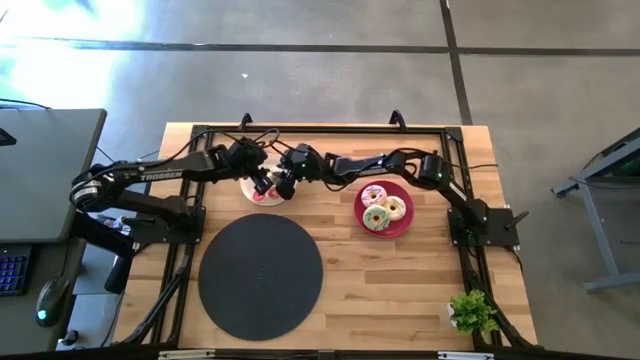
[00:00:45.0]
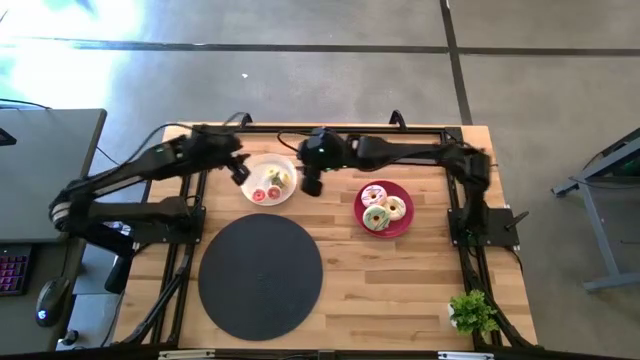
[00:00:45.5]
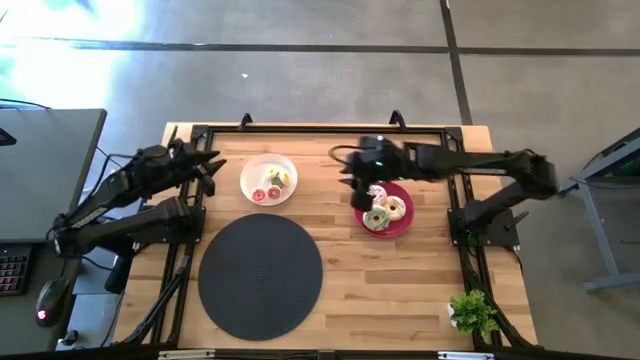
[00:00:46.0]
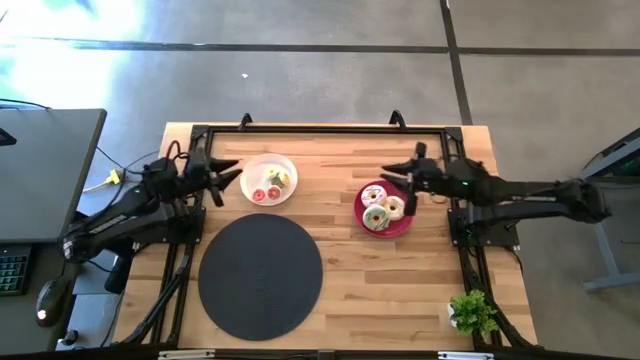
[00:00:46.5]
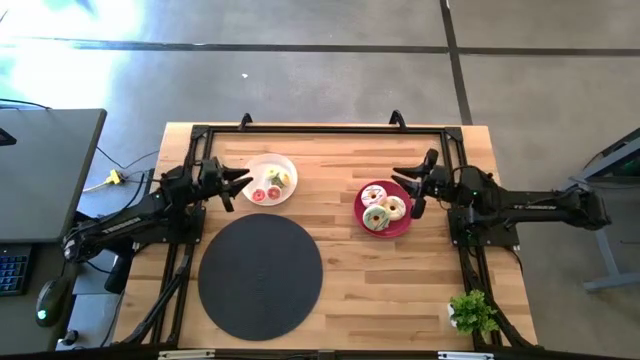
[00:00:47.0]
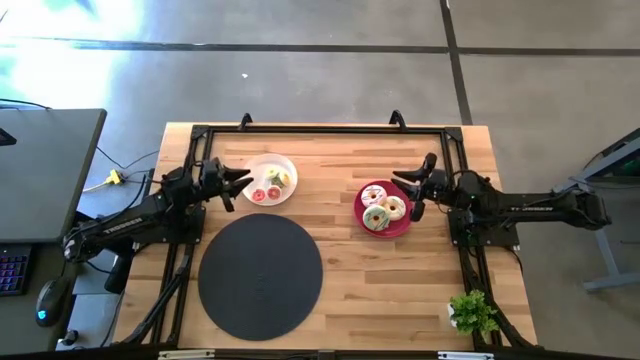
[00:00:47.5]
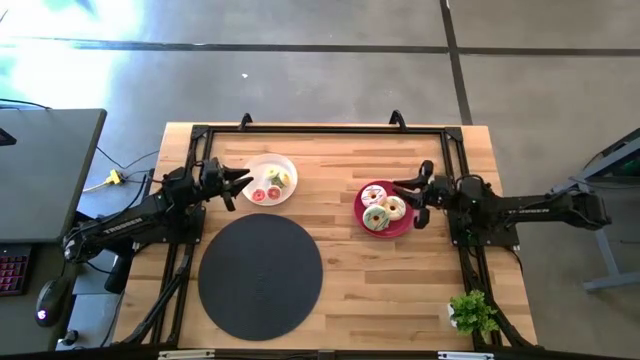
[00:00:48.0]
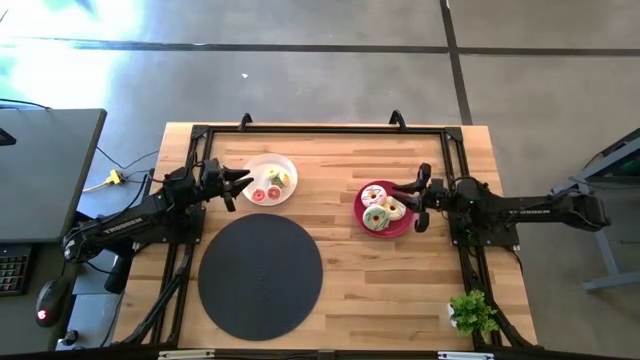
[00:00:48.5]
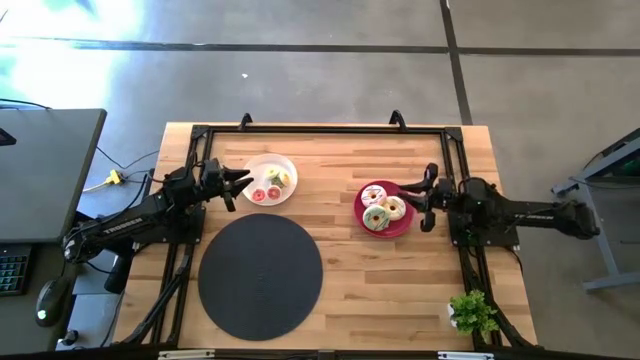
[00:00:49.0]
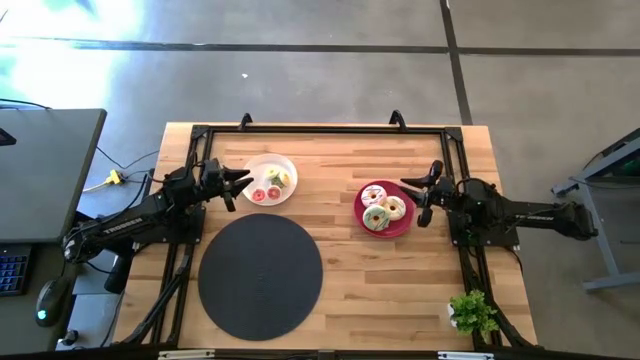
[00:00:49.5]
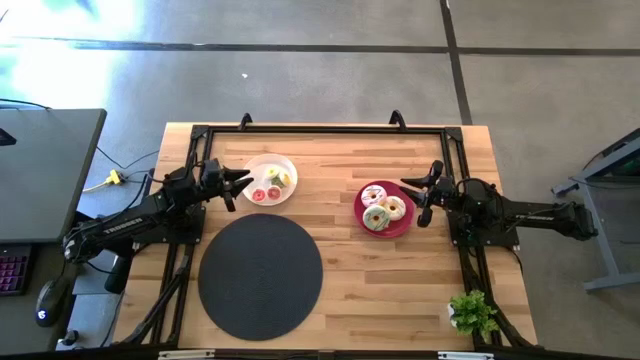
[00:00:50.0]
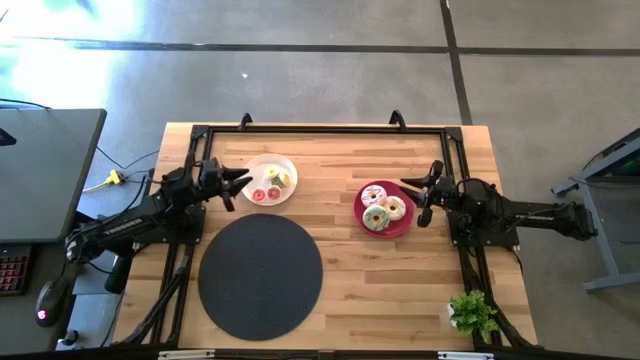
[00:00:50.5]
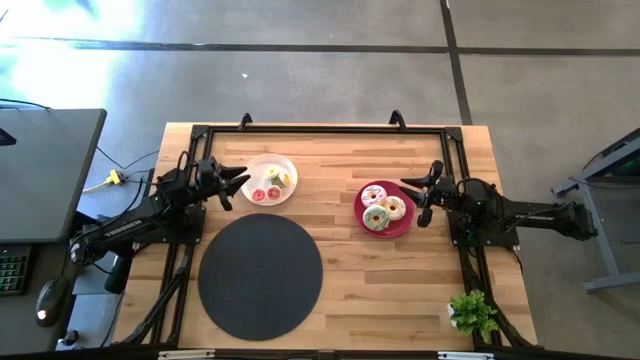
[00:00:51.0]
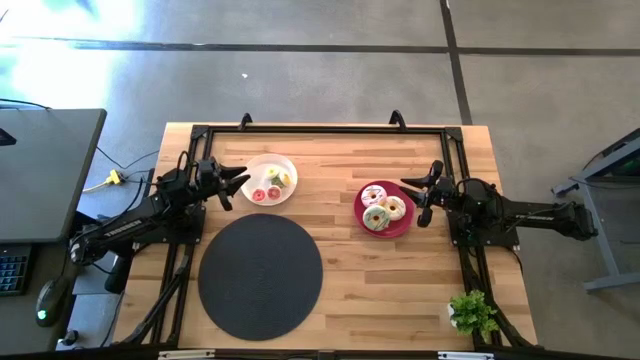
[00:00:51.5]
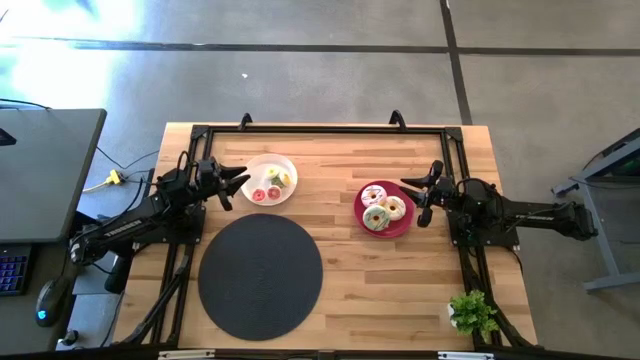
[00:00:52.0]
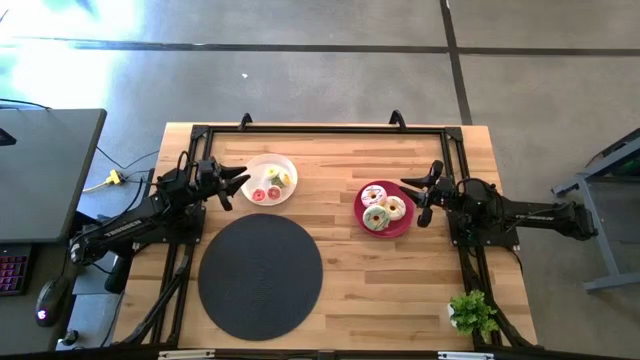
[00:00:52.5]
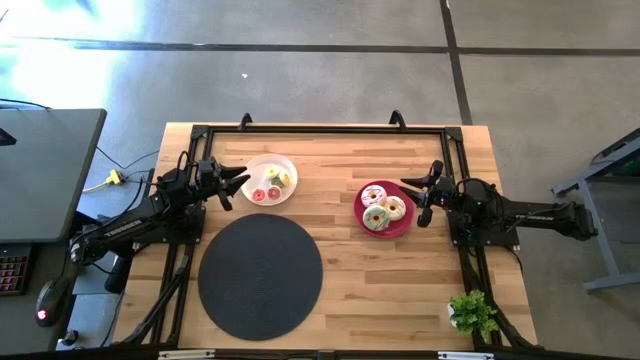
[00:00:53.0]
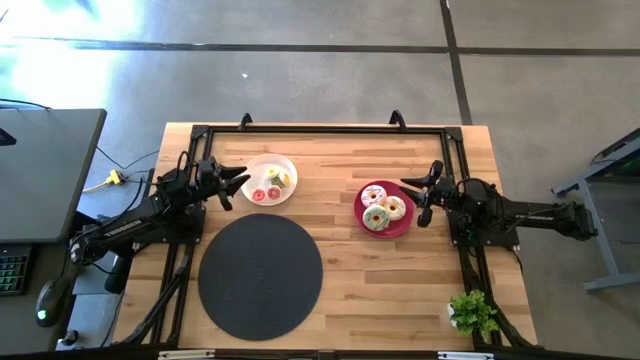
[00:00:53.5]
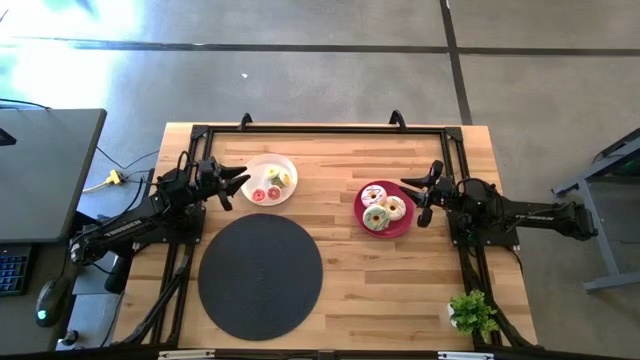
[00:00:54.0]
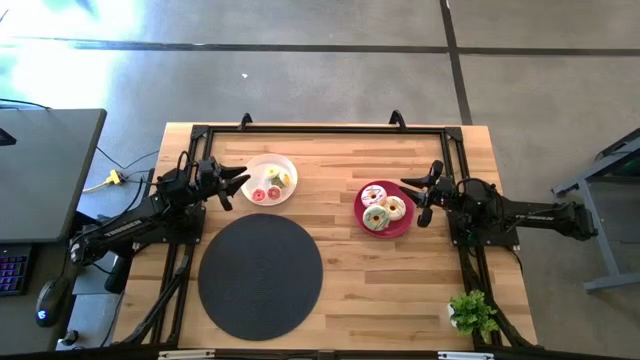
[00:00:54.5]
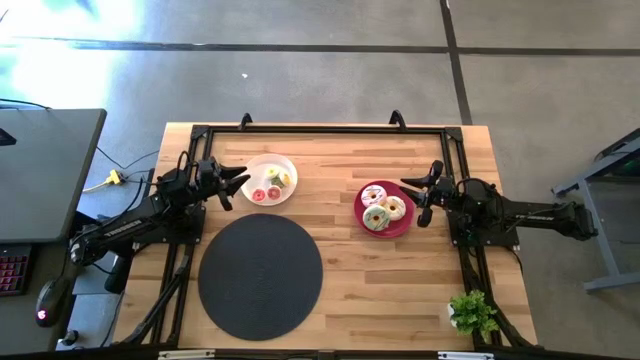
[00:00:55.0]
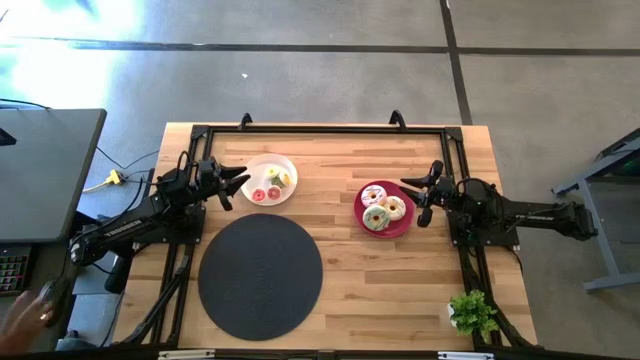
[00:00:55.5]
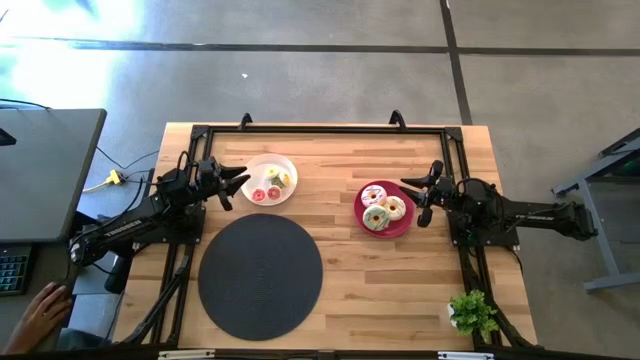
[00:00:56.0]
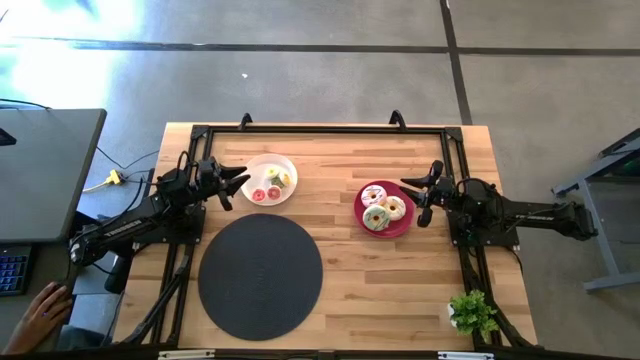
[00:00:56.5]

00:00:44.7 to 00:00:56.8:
Task: Pick & Place donuts
Return to Home Position

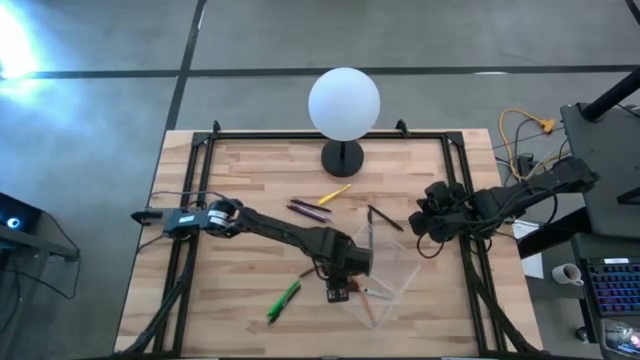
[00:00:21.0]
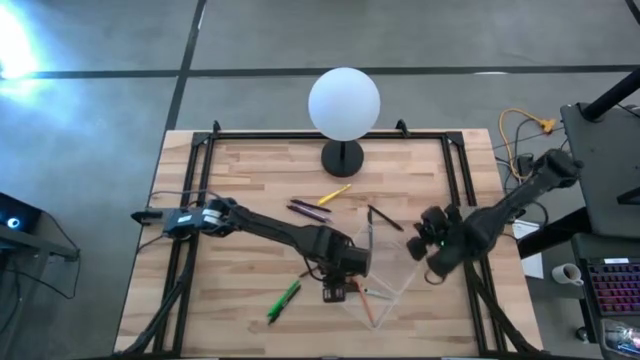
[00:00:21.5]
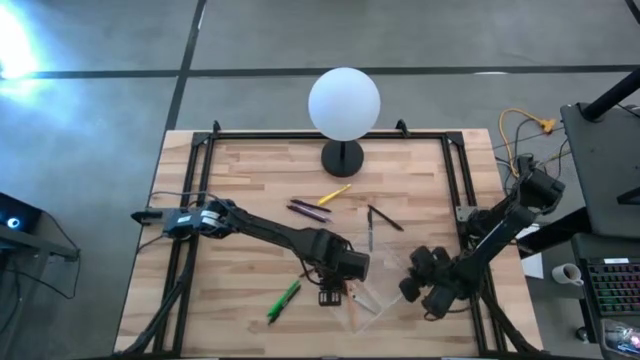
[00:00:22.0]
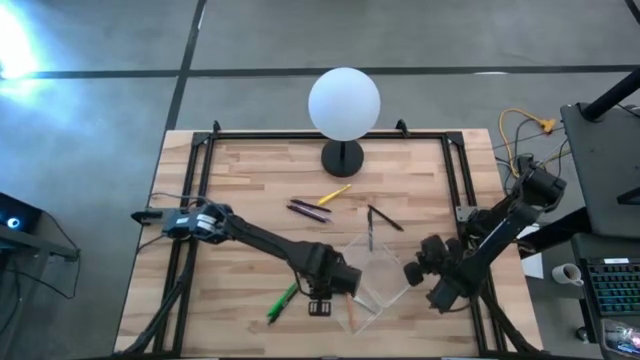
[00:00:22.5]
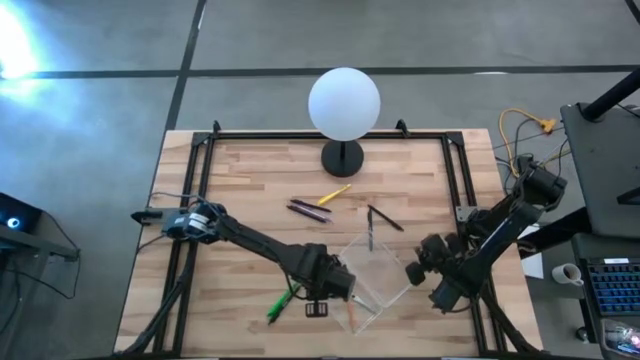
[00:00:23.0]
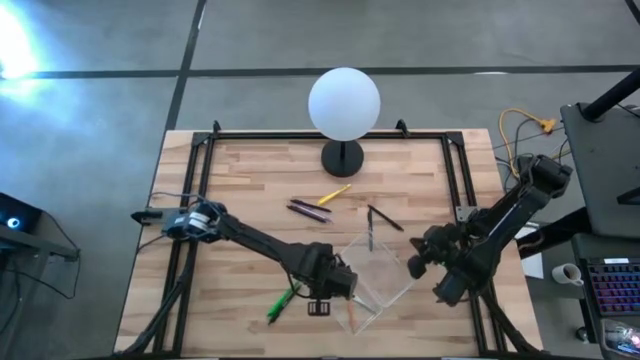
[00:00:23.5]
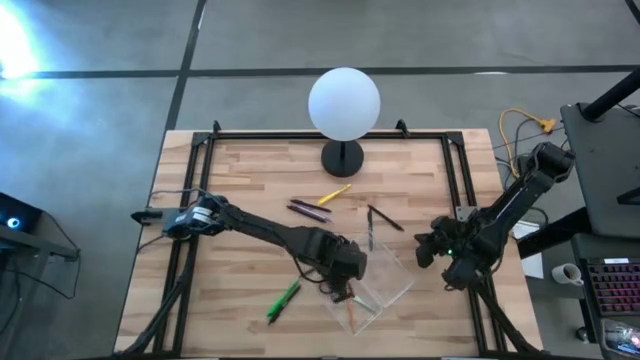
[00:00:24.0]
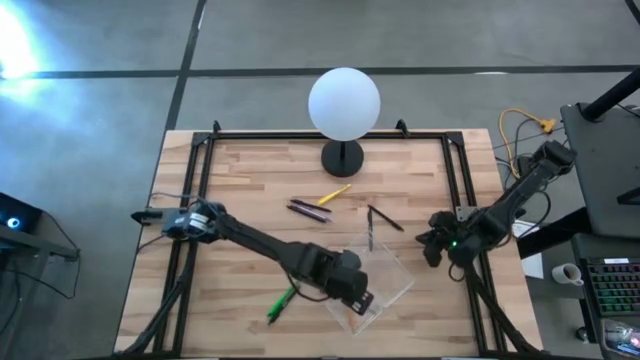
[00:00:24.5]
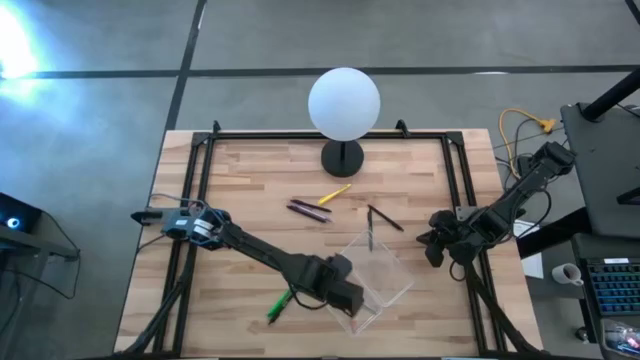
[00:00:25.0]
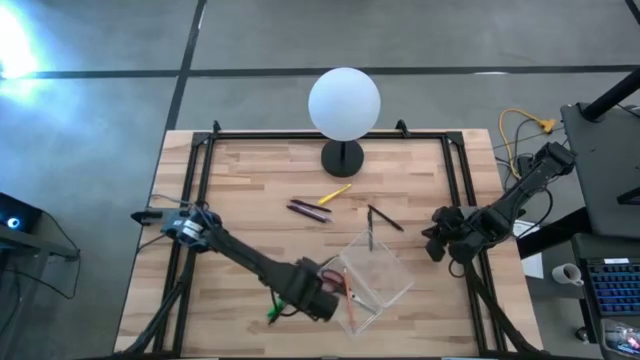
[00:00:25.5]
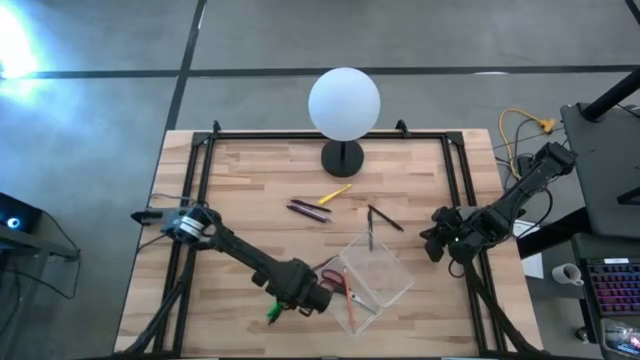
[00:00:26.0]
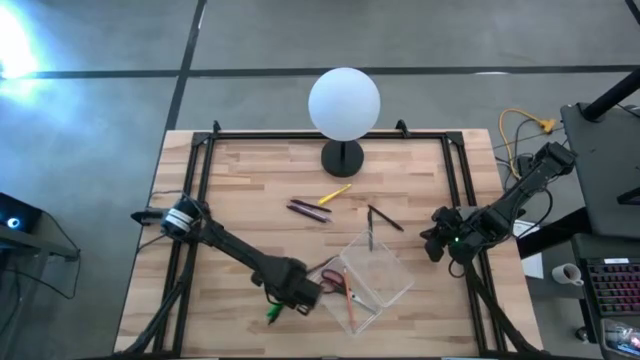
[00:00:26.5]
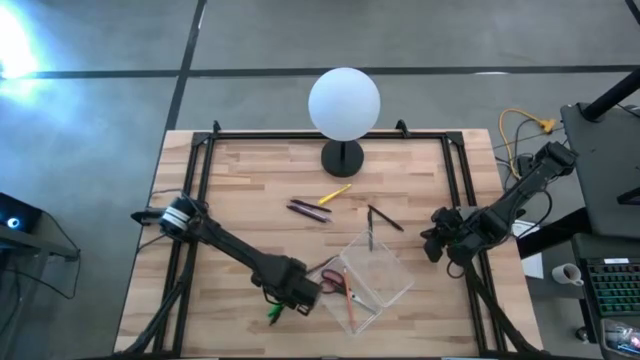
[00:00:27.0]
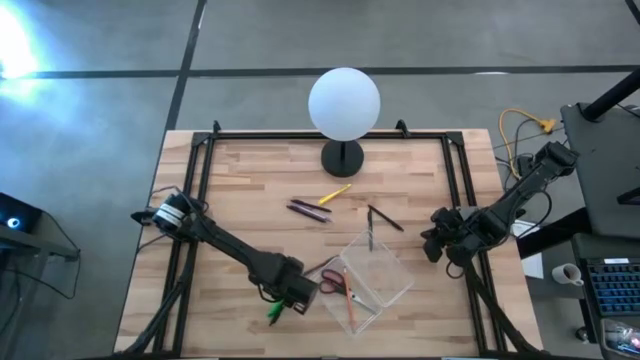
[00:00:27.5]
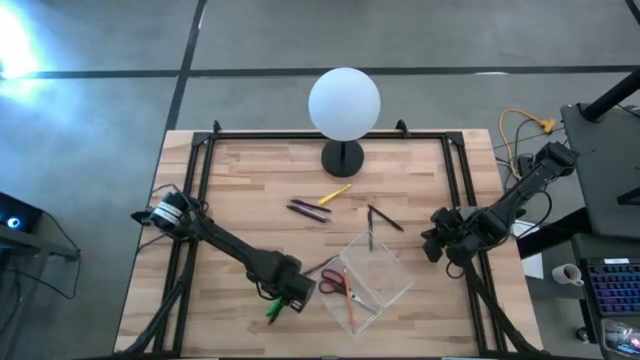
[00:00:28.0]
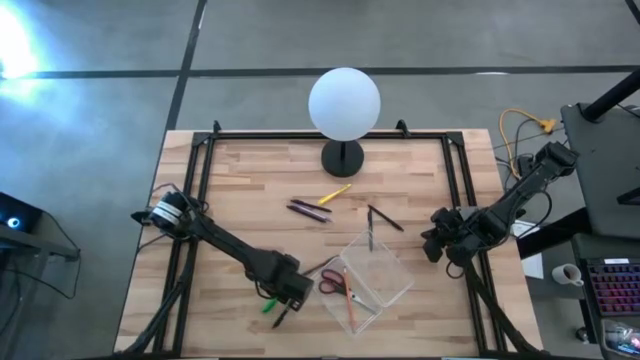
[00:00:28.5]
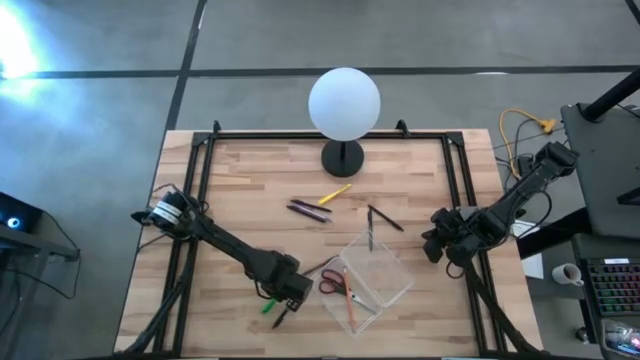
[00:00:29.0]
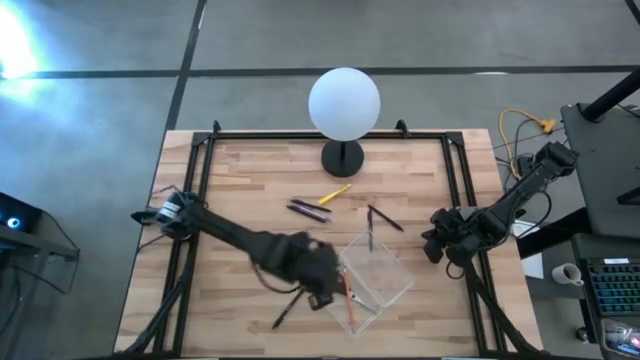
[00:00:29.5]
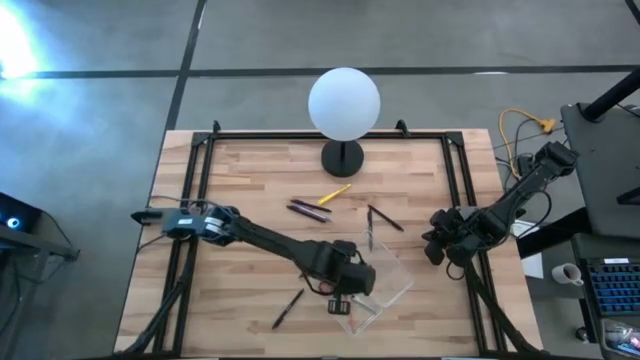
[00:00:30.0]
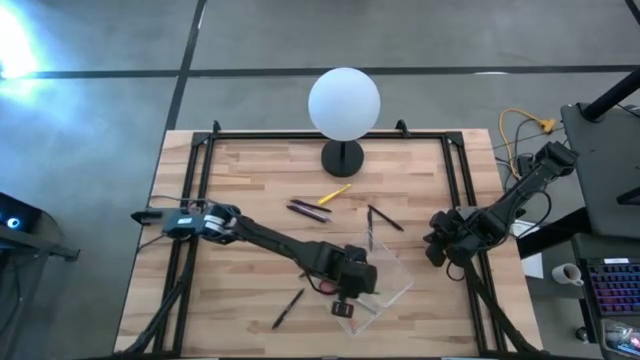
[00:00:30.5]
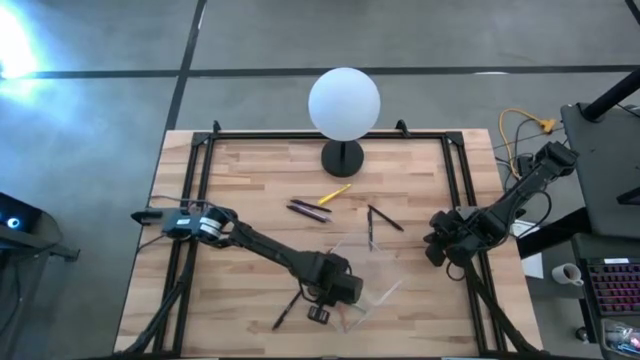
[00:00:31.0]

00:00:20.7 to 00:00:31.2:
Task: Pick & place school supplies into a supply box
Put the green pen into the supply box
